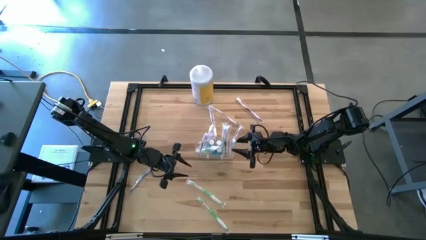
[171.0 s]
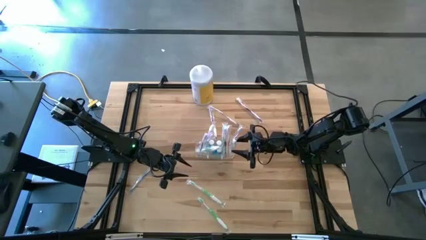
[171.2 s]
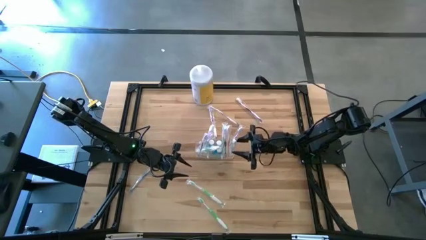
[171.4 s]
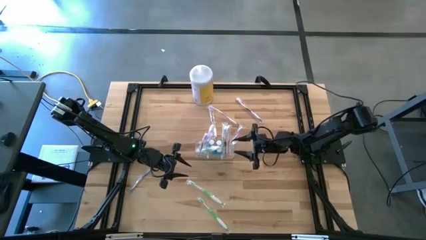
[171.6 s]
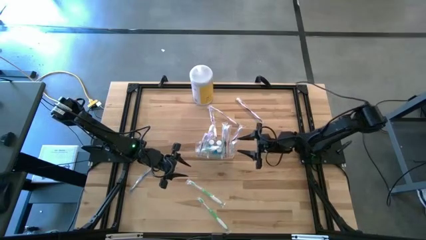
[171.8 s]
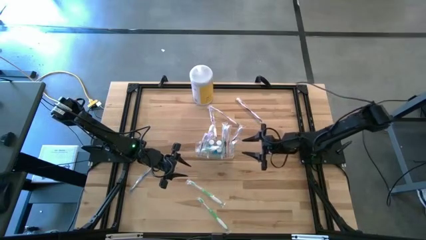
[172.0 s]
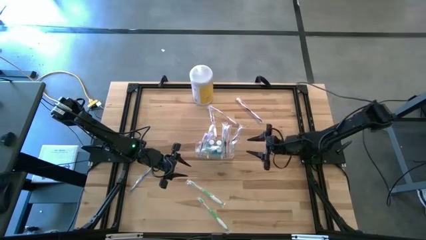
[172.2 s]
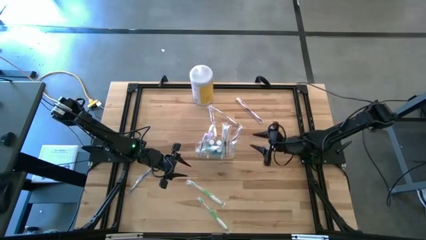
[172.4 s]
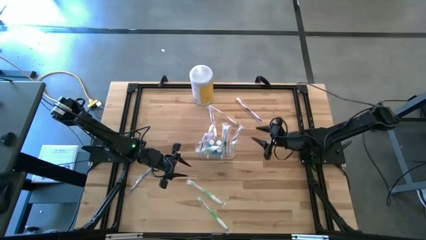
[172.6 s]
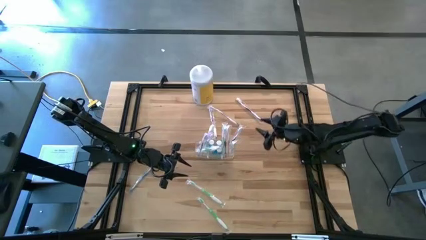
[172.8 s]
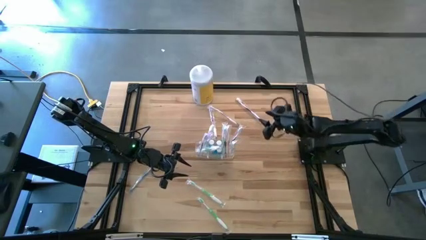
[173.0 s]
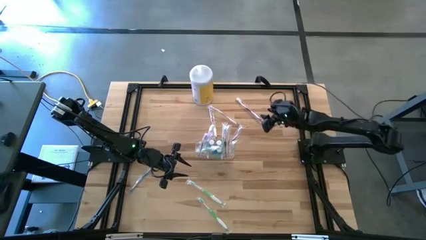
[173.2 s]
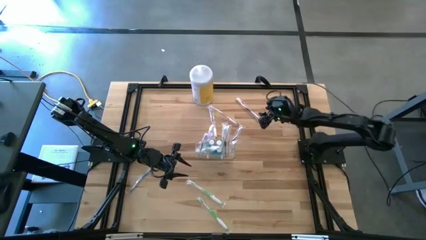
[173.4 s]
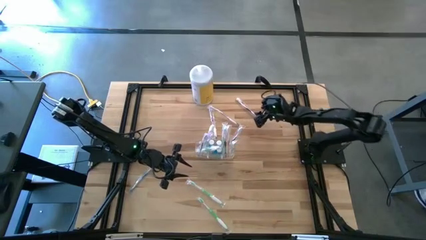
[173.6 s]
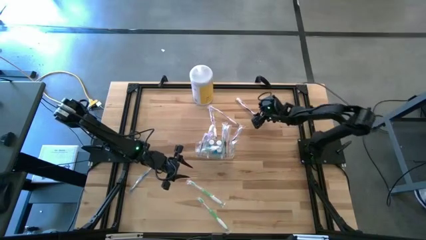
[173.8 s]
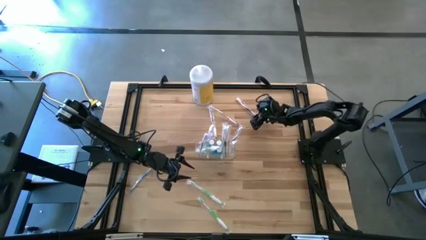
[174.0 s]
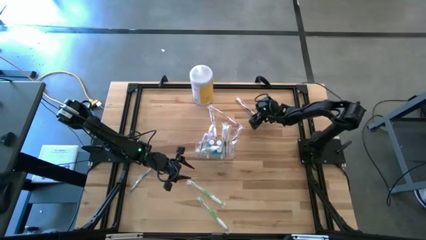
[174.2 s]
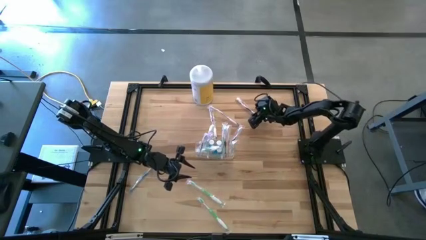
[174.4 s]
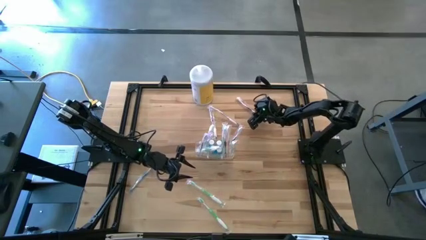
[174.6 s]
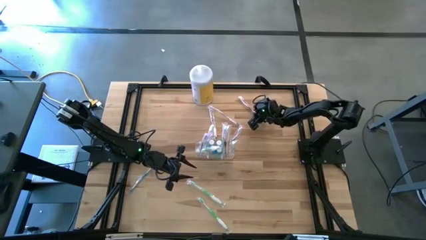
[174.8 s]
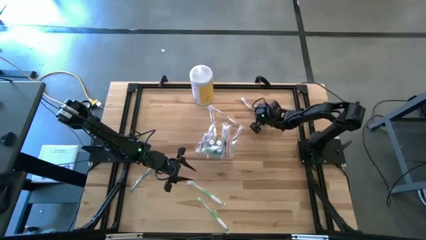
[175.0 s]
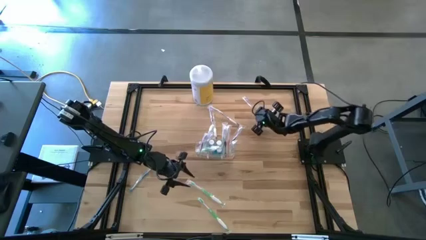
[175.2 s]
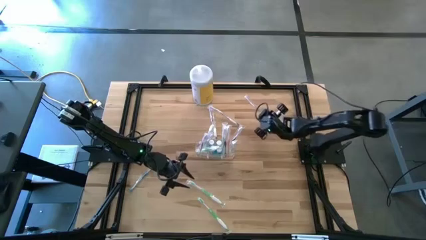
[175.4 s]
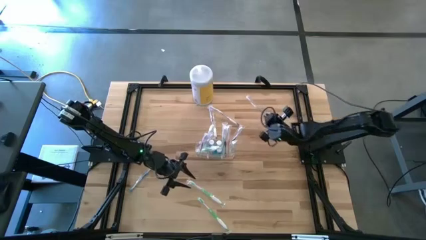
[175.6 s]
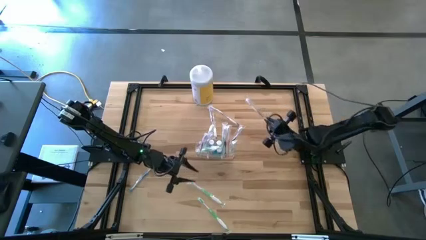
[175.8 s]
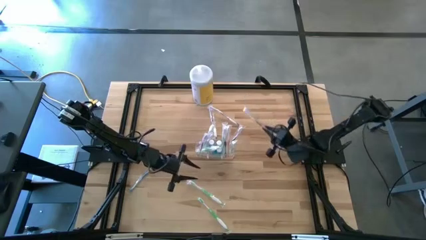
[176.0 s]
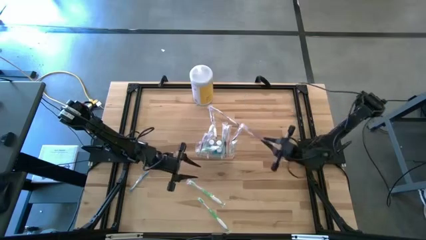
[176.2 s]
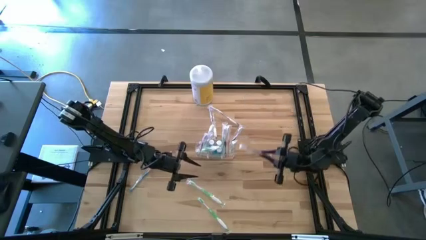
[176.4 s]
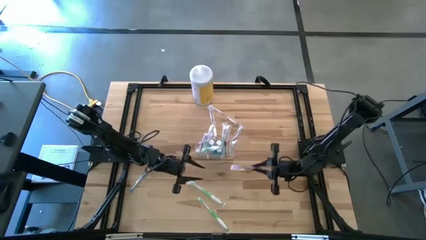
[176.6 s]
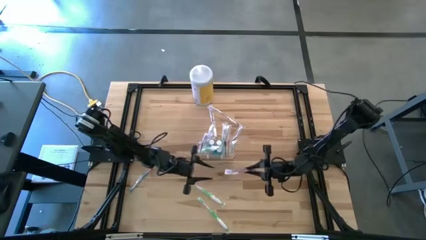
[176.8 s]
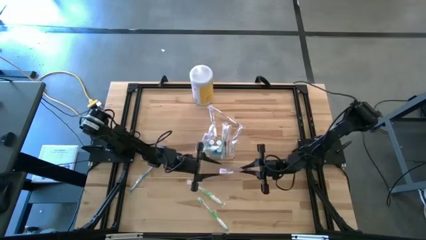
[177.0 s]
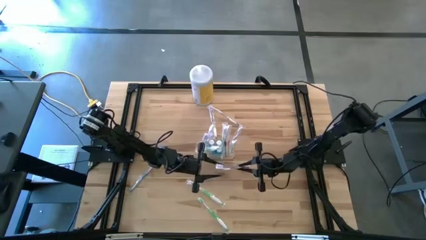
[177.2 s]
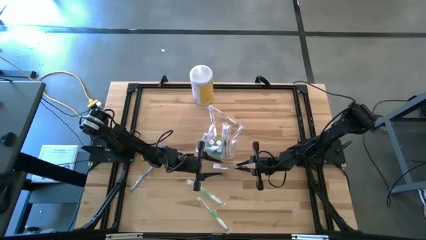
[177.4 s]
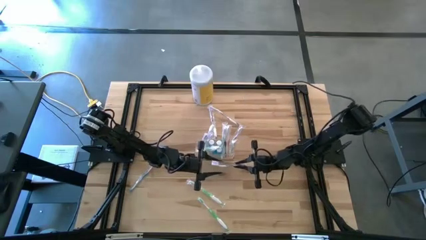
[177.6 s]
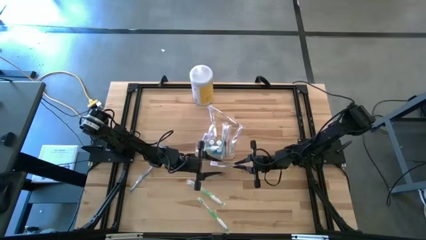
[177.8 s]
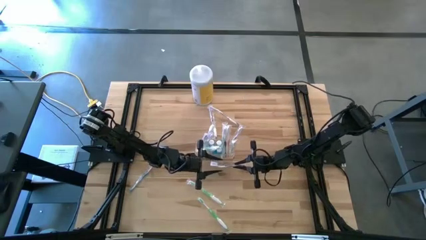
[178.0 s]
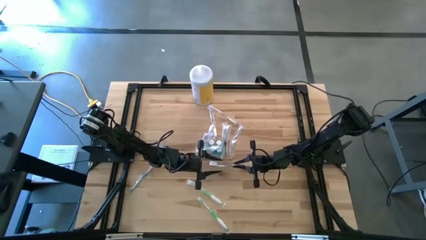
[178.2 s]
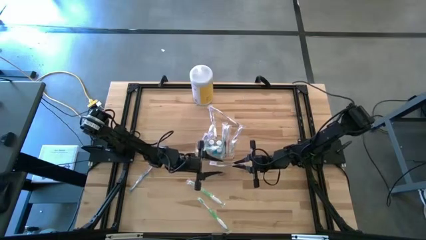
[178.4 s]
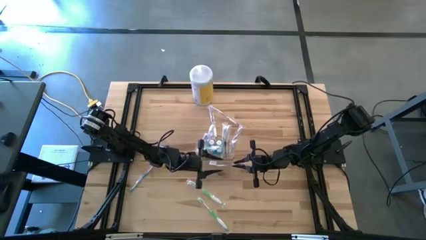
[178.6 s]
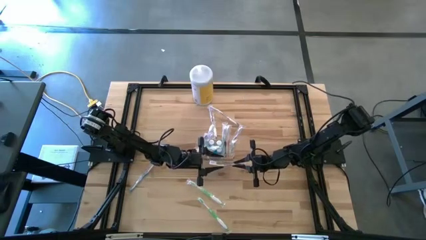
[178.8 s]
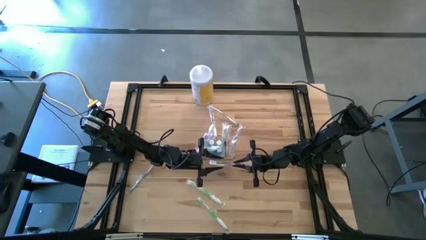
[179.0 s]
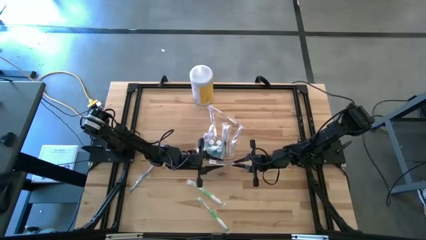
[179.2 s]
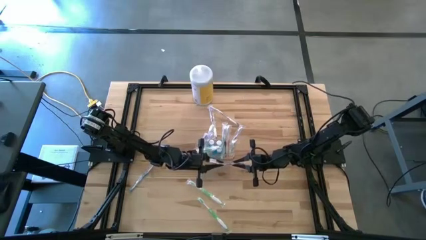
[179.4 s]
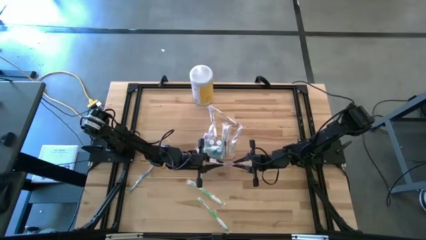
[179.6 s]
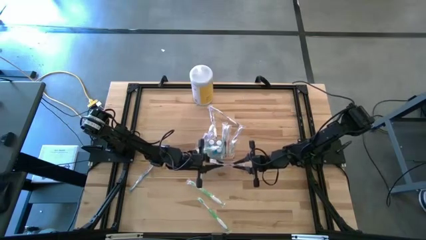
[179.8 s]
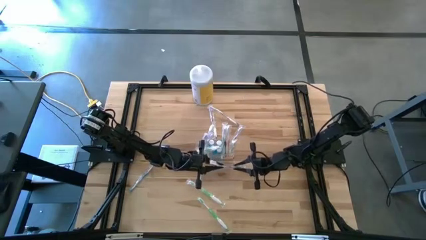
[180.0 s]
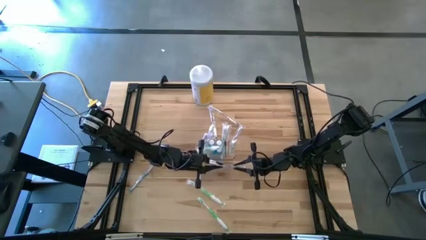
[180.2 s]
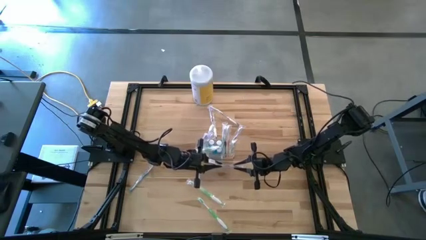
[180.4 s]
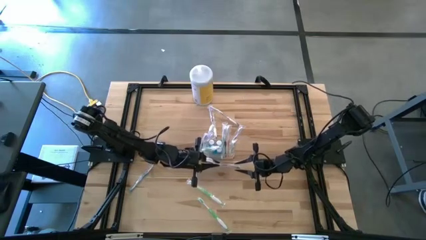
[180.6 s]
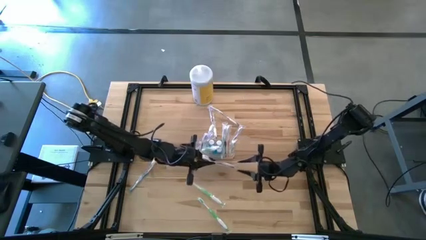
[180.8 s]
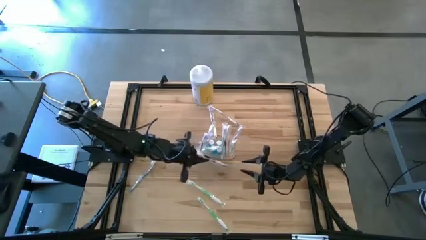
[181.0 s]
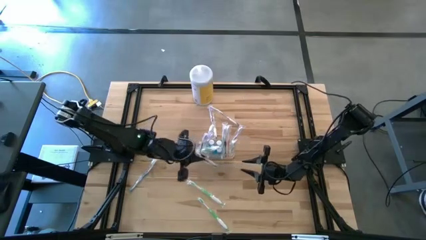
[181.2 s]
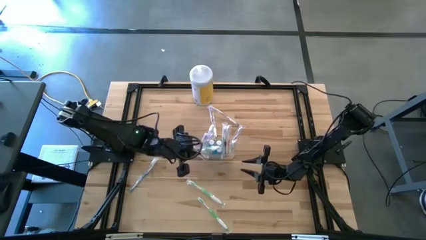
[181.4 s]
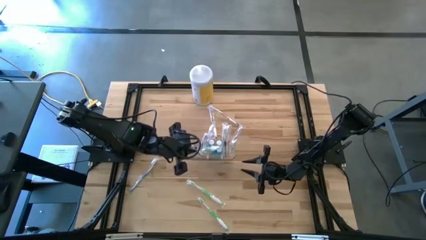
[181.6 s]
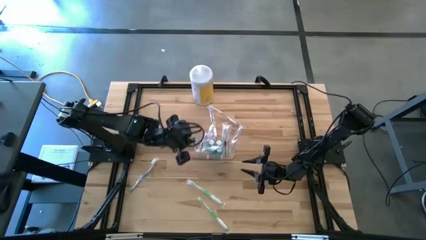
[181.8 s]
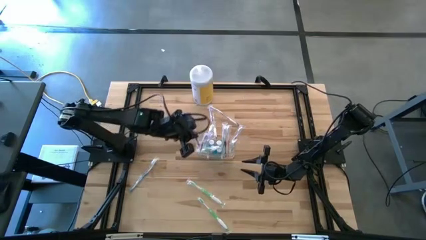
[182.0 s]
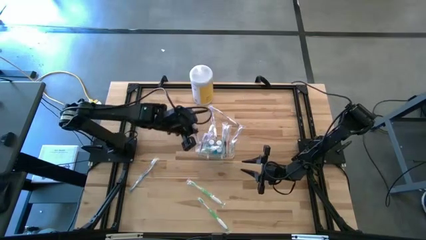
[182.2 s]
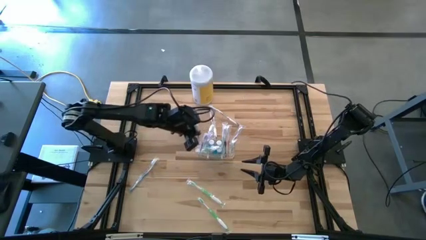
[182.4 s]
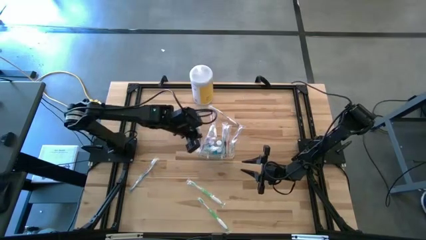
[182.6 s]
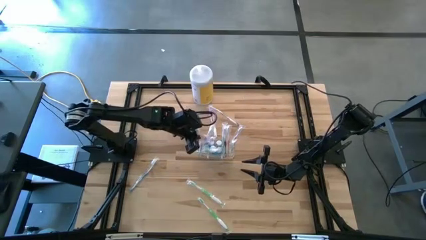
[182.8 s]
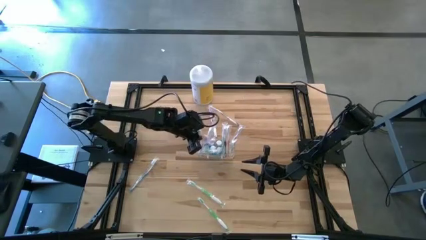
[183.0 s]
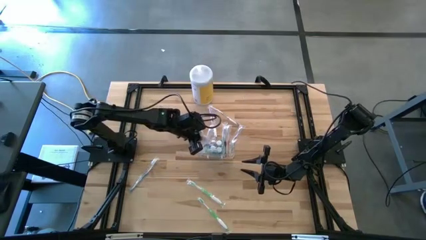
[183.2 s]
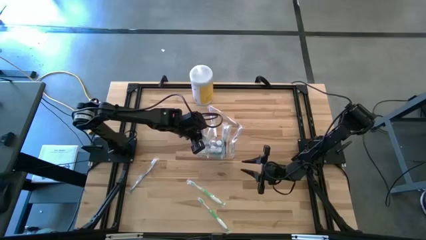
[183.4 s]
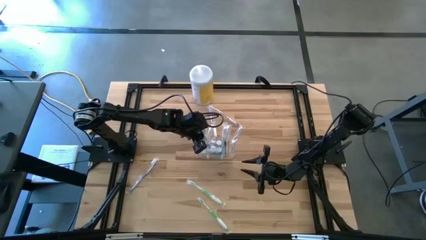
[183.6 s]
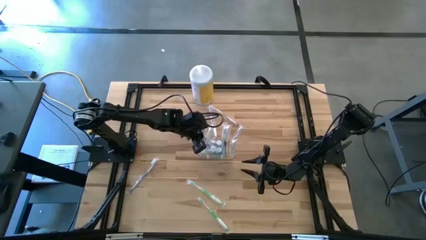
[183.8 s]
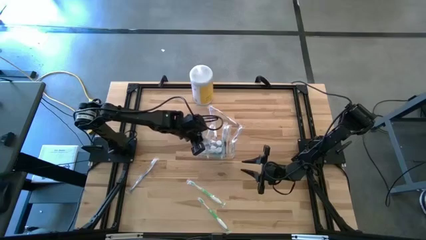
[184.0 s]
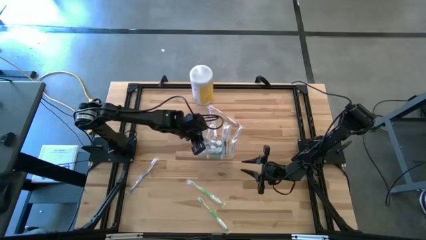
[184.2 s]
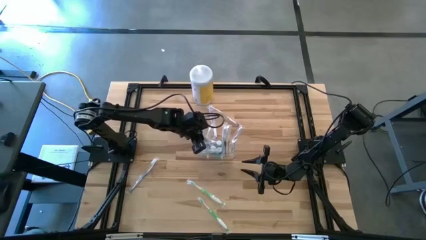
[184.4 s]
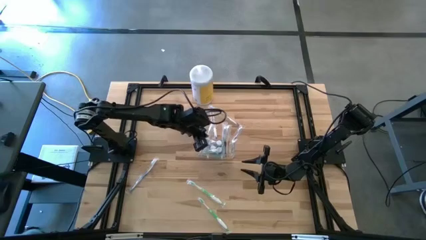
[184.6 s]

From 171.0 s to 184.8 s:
Task: Pick & Place toothbrushing station
Put the purple toothbrush into the transparent organizer

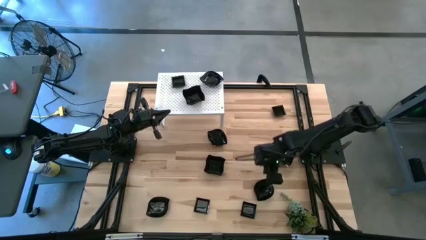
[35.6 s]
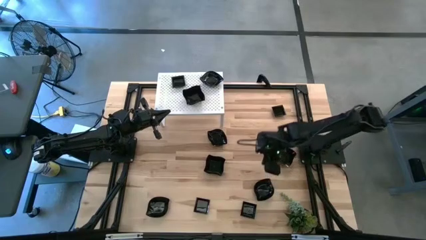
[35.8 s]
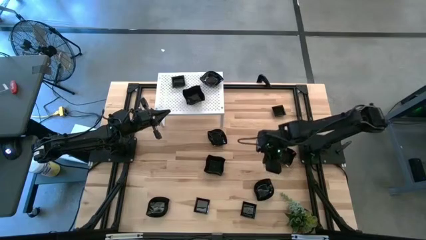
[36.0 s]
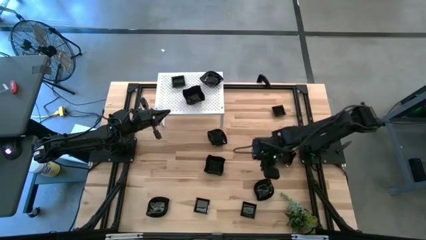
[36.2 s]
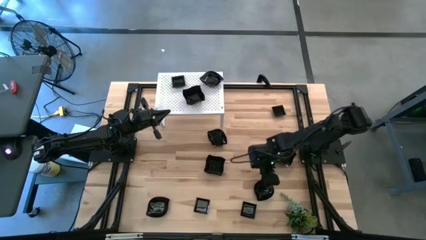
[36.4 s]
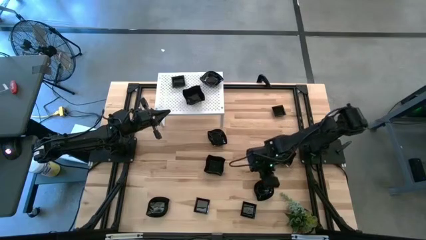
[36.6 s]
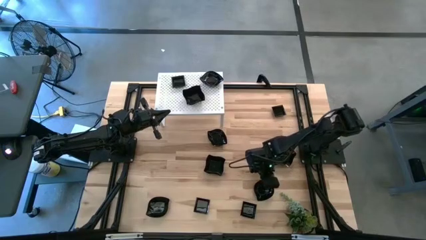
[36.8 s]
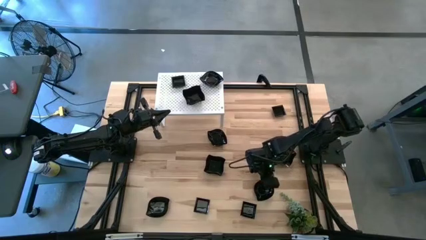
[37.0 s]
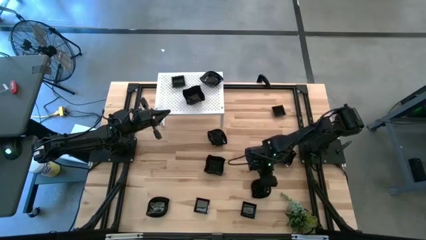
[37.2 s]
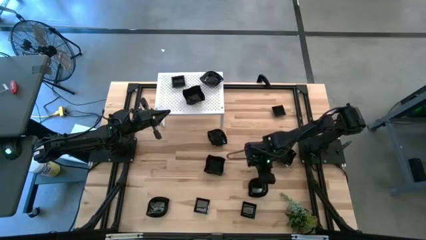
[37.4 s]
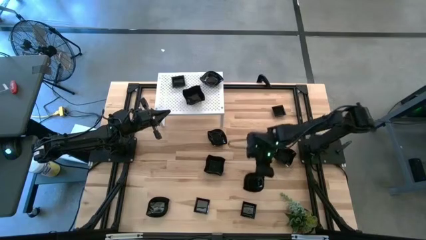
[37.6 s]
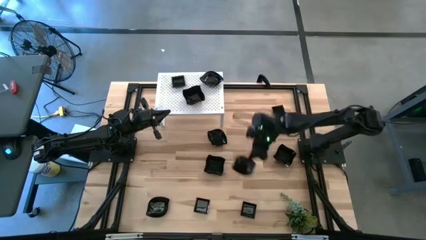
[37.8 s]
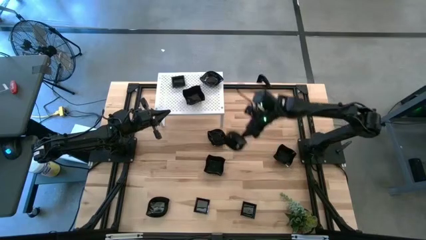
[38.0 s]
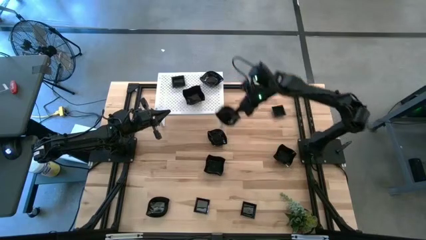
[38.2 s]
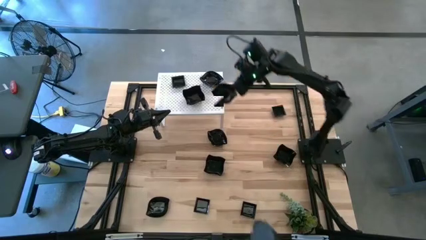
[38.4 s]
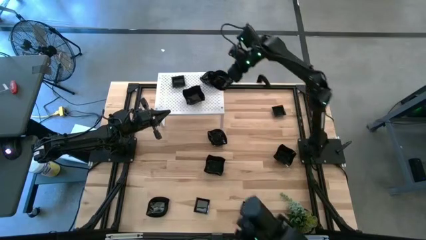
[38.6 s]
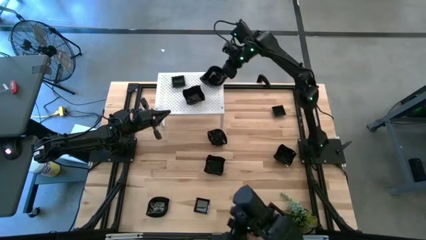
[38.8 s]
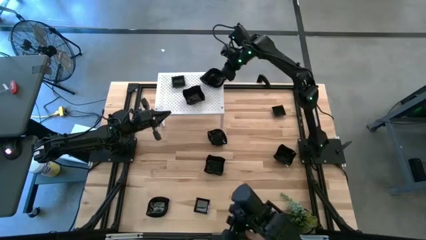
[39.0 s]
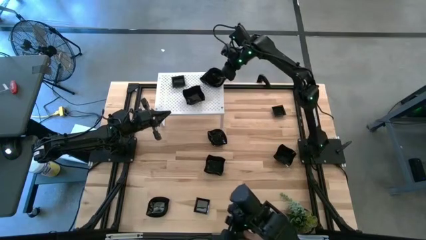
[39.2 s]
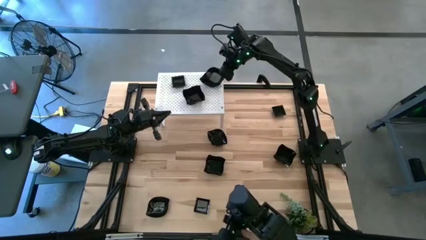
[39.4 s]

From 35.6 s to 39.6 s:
Task: Pick & Place Mini shaped plates
Stack the black leaf-shaped plate on top of the black leaf-shaped plate on the shelf
